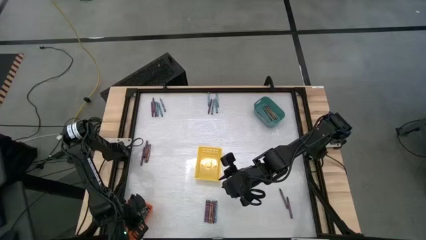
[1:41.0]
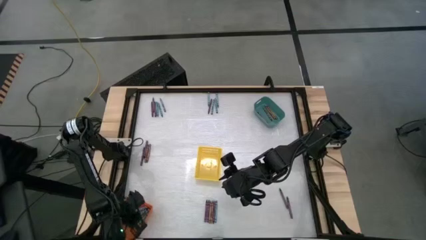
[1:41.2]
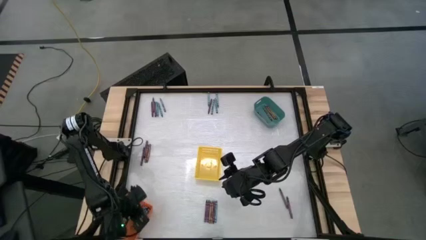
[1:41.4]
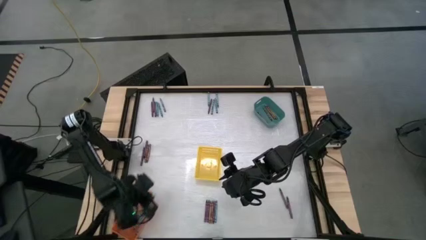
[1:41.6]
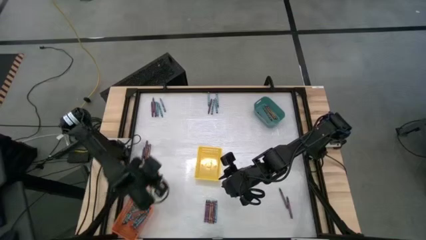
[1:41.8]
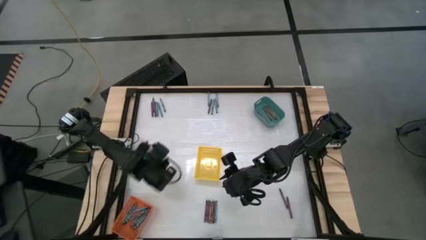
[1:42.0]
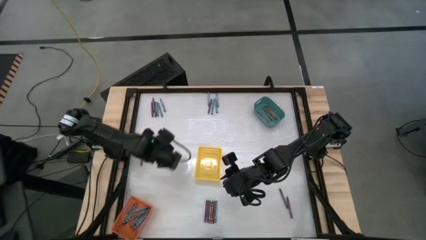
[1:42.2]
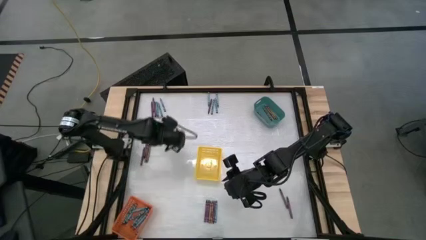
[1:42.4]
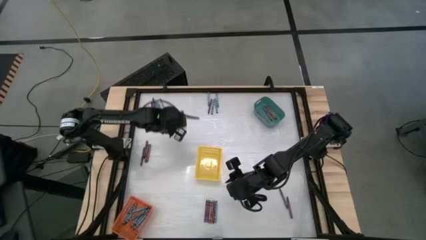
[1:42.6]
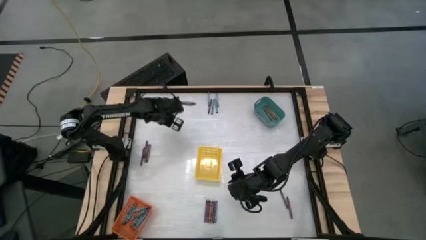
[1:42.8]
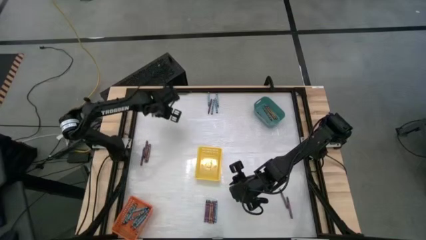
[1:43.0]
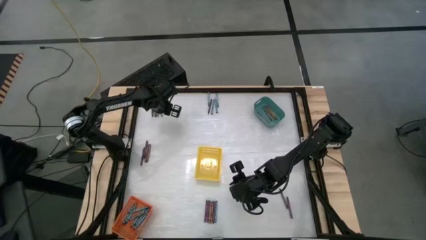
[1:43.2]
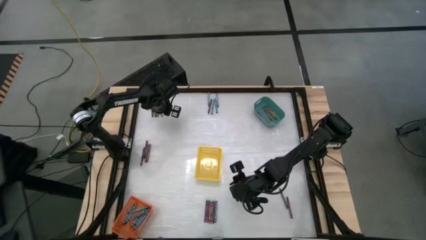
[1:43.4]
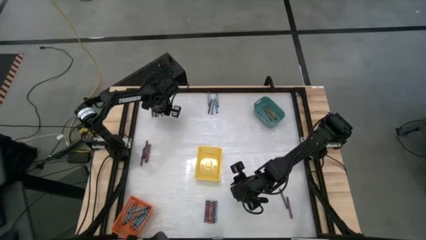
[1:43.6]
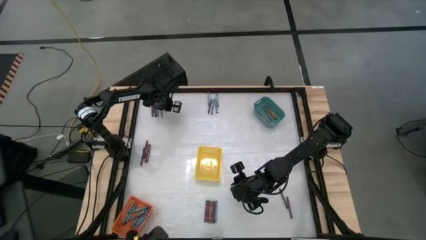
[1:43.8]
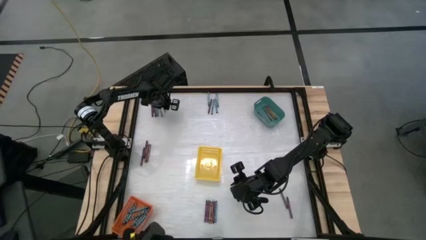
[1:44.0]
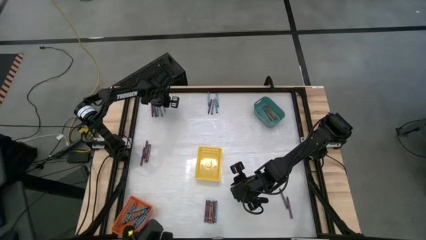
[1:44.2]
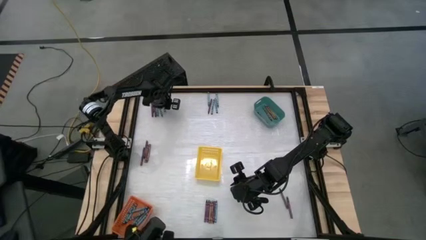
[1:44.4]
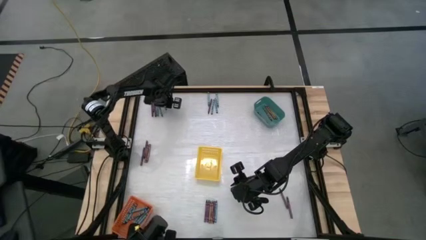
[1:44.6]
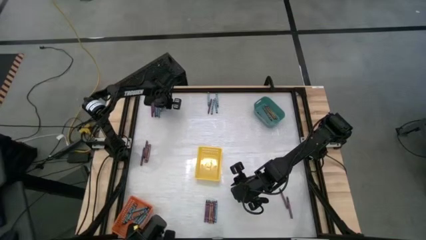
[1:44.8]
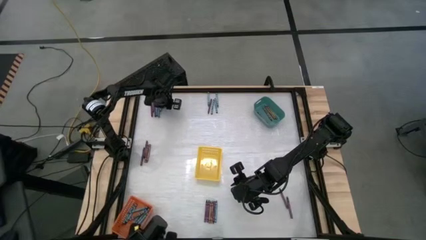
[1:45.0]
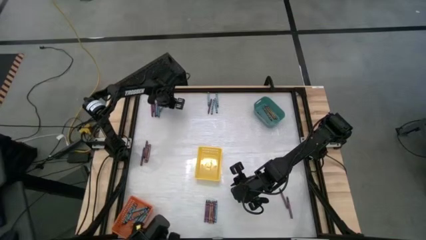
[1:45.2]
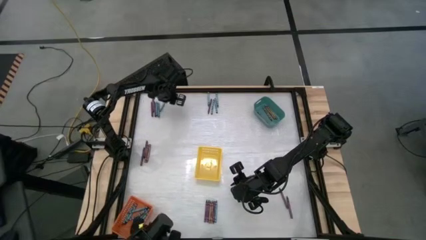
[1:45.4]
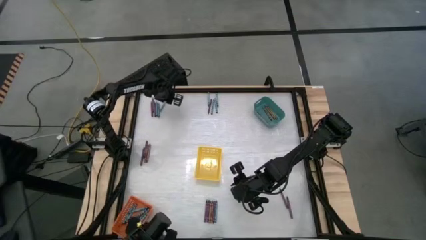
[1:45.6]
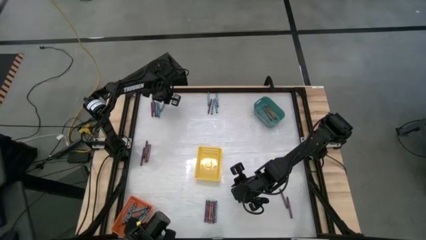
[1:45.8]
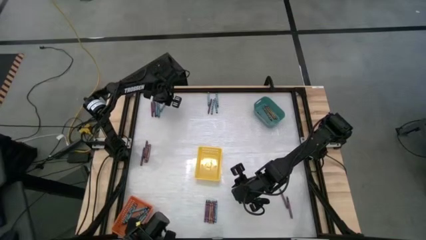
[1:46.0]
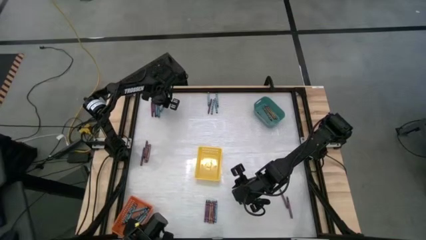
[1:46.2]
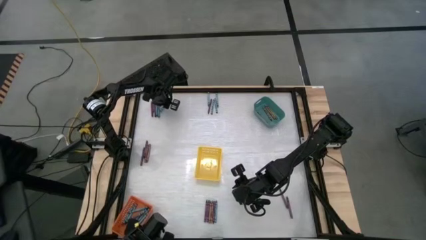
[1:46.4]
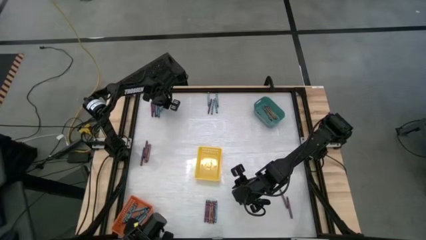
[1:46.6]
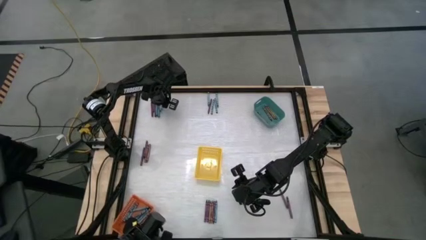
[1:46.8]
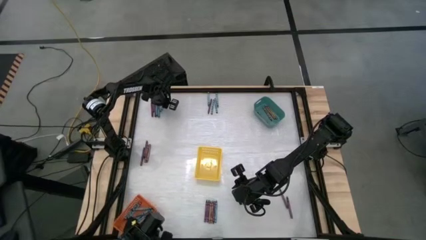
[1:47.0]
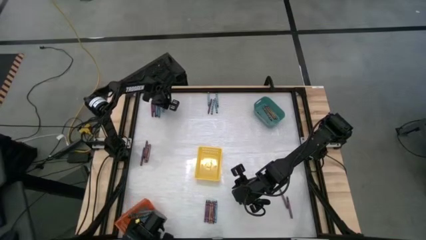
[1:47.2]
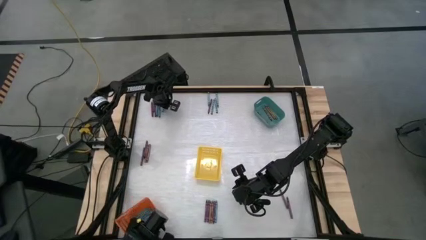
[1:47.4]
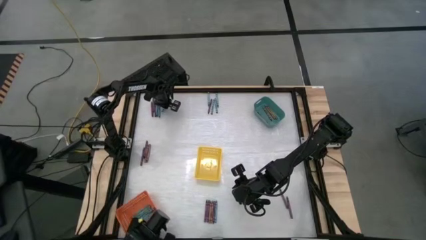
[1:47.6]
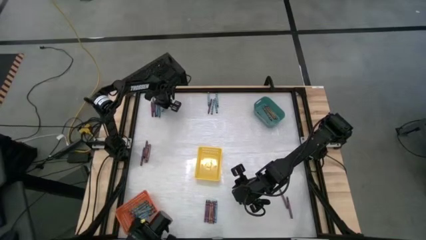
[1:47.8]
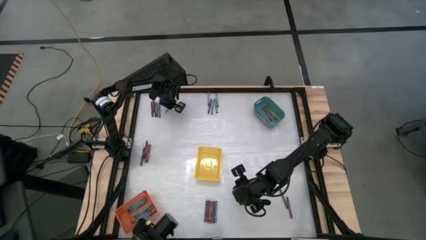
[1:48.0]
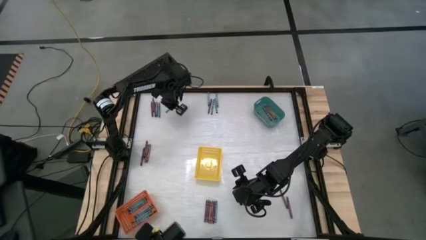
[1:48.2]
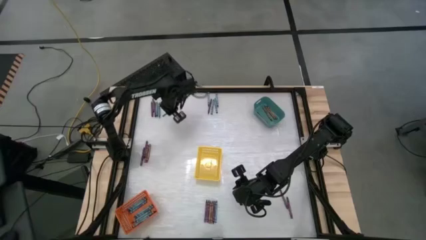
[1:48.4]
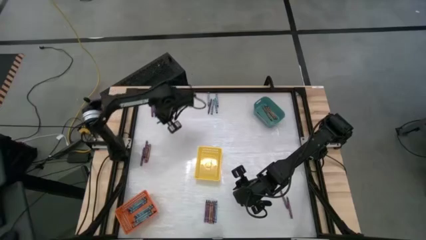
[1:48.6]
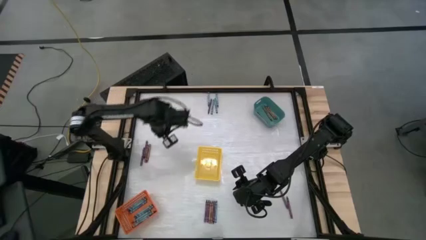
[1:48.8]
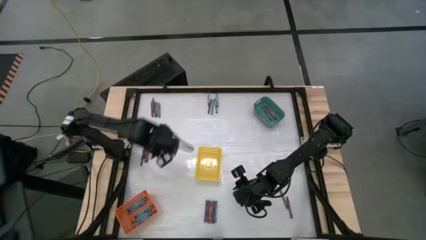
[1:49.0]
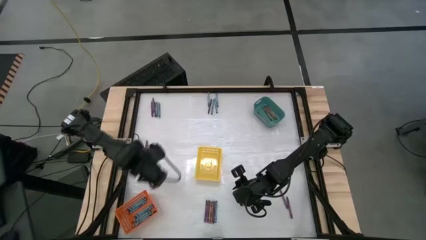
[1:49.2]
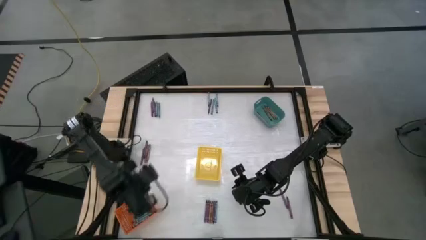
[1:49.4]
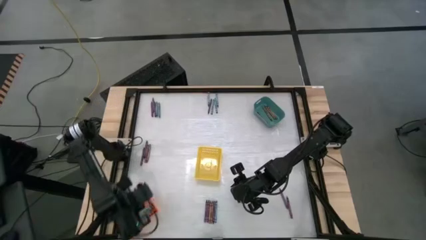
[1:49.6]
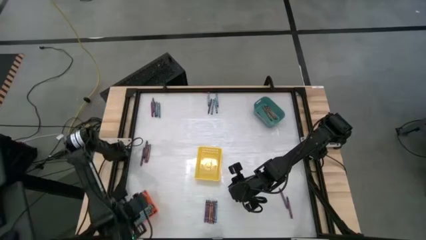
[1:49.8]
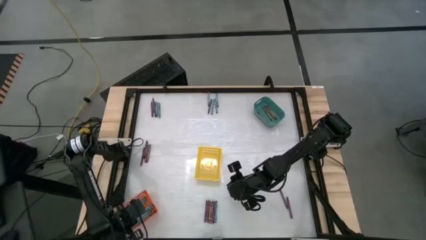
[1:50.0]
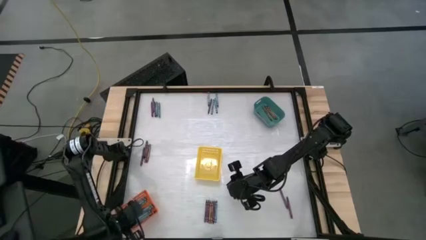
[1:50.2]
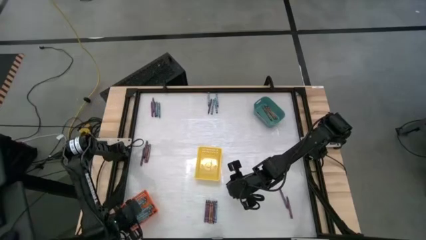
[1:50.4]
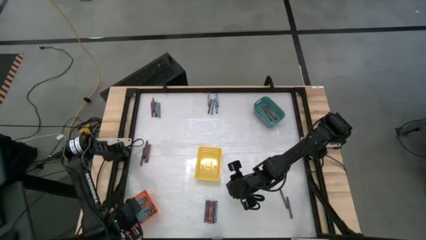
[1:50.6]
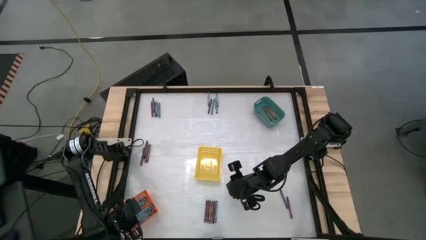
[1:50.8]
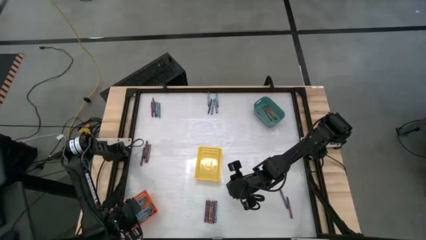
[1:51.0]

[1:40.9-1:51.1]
Task: Sort crayons
Put the dark blue crayon into the orange basket

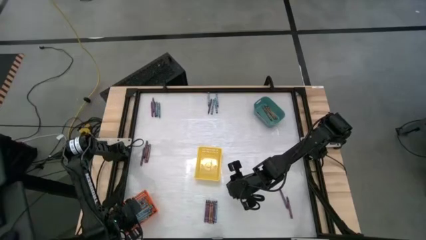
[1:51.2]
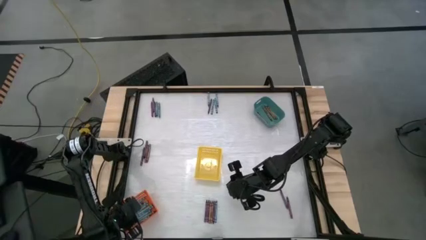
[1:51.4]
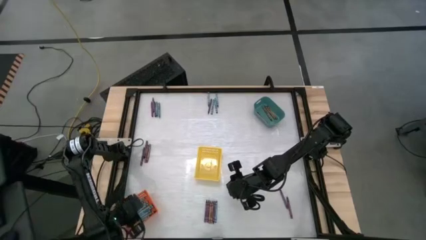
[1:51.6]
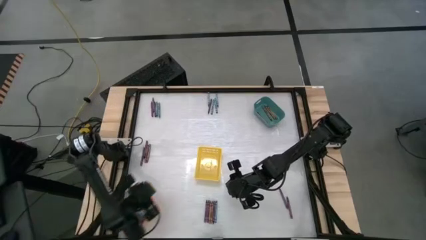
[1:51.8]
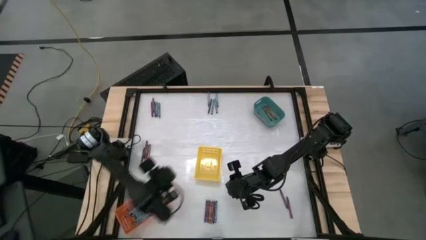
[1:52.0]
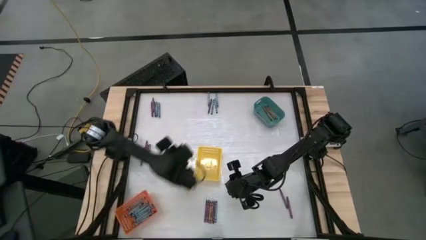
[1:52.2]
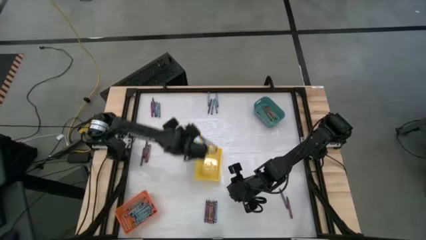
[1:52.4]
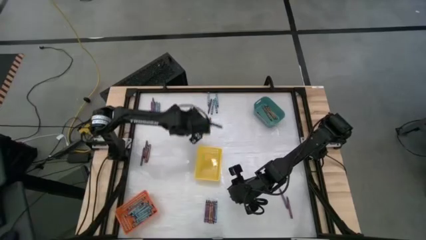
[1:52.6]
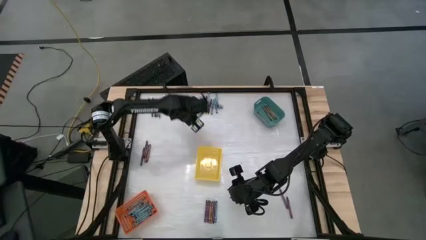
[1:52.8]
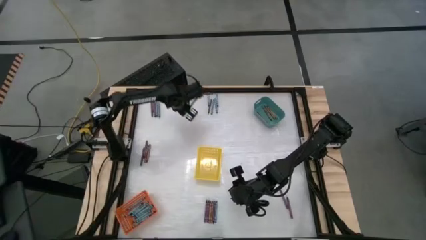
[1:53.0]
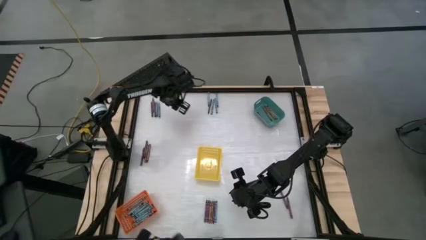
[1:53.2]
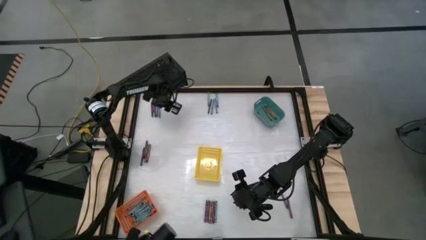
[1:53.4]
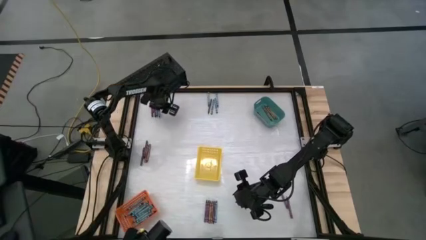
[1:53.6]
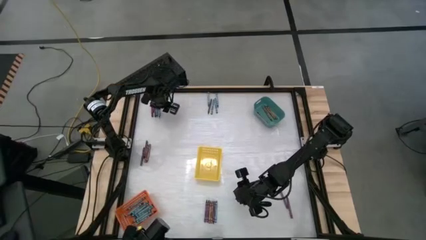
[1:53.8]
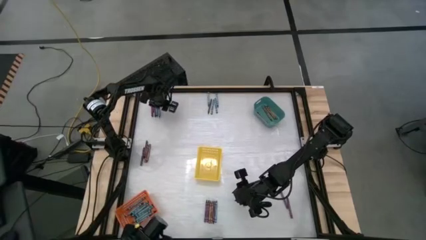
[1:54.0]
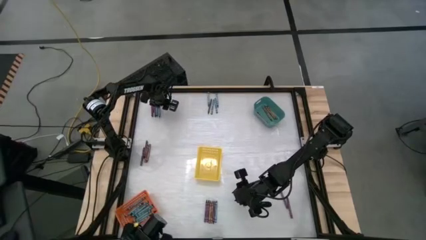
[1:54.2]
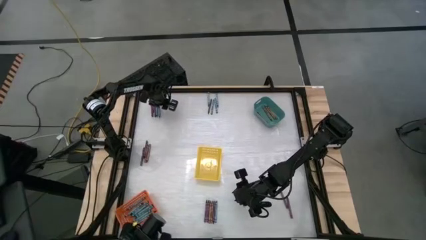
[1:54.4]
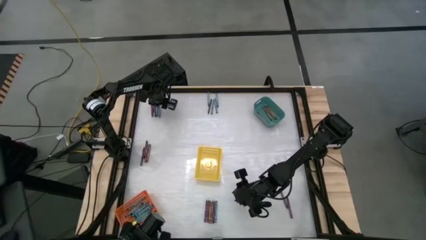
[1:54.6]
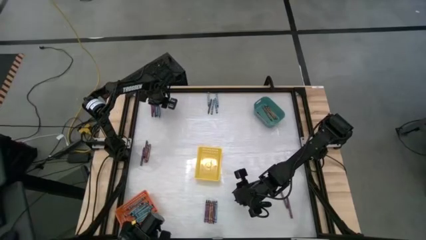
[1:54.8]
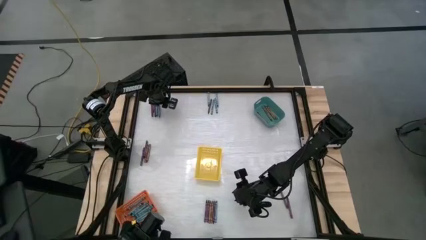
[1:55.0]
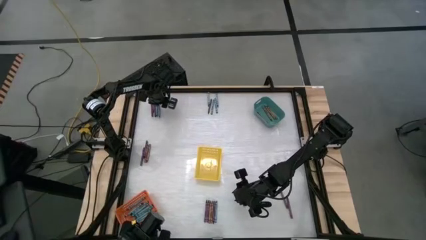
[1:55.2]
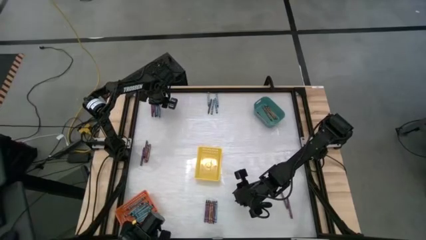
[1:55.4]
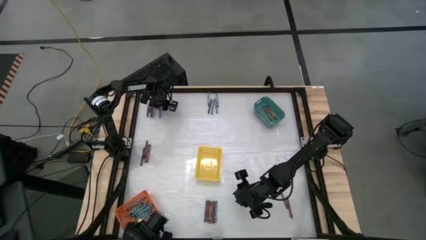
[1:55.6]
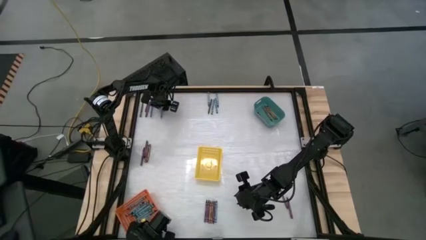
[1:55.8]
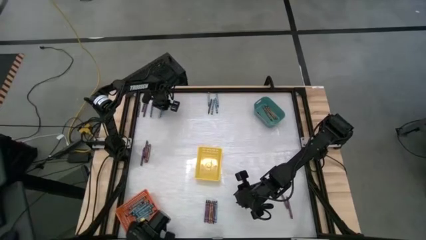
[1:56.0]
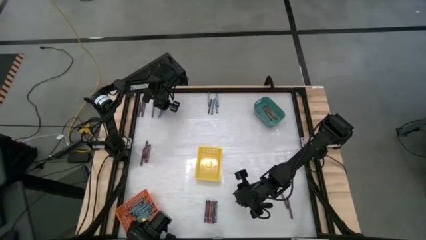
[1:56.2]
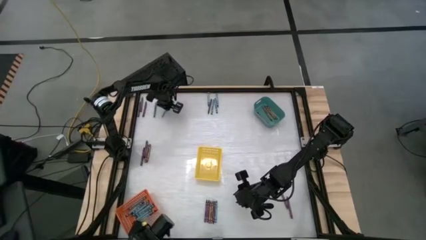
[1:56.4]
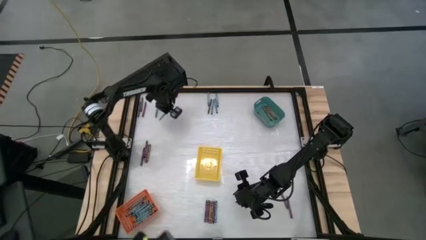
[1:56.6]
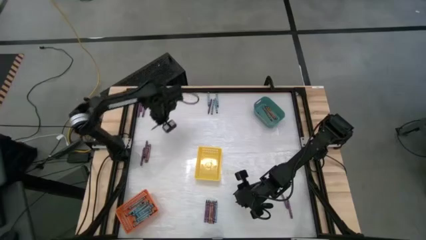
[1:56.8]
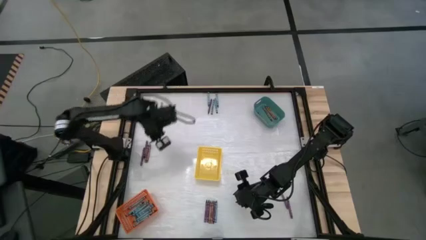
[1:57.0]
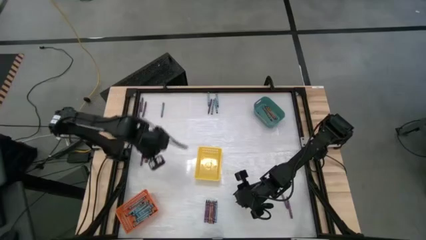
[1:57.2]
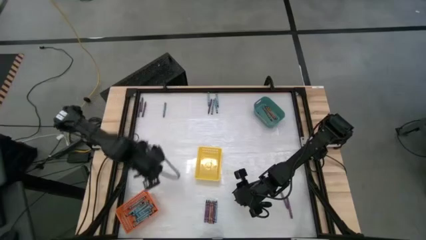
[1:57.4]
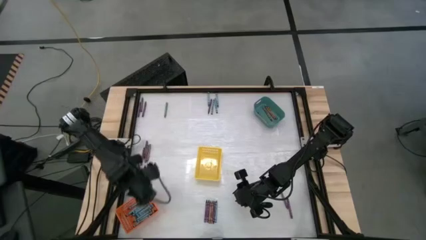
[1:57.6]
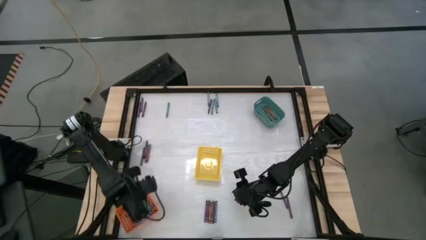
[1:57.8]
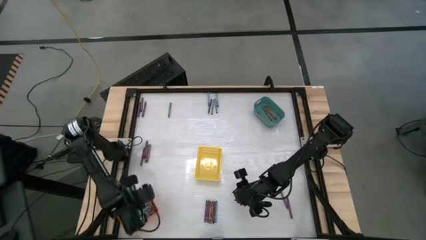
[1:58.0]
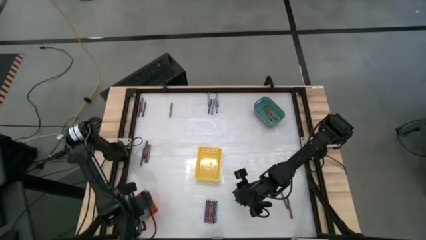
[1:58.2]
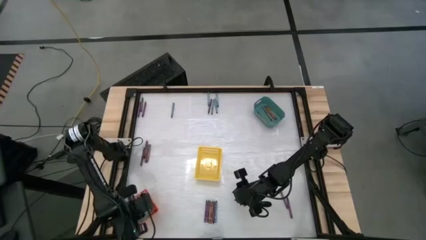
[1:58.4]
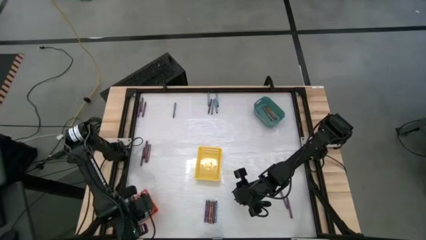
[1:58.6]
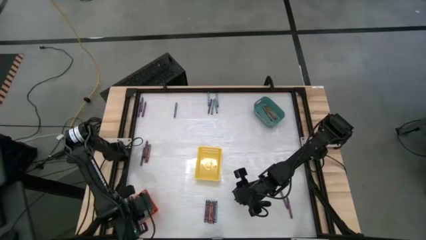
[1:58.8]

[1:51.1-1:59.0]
Put the light blue crayon into the orange basket
